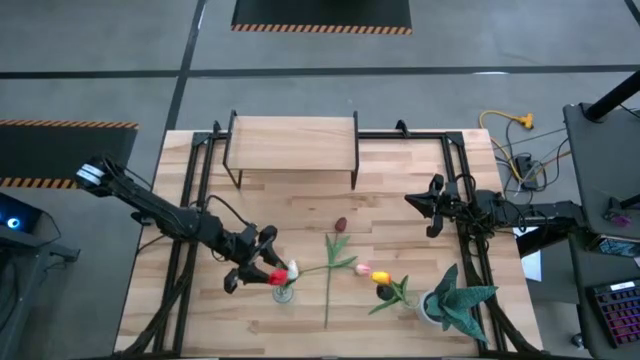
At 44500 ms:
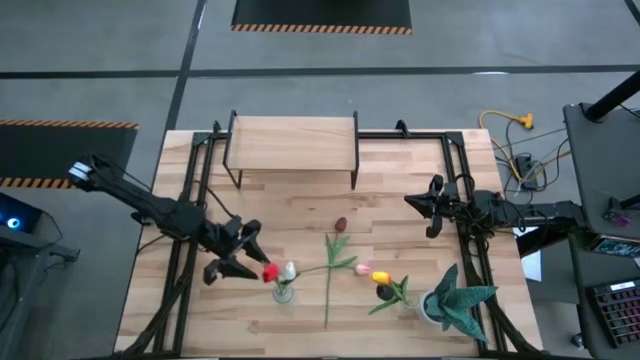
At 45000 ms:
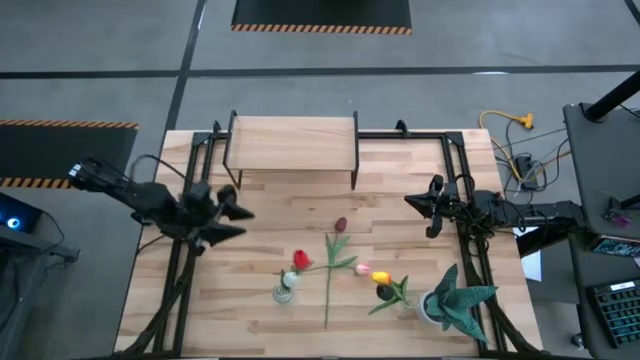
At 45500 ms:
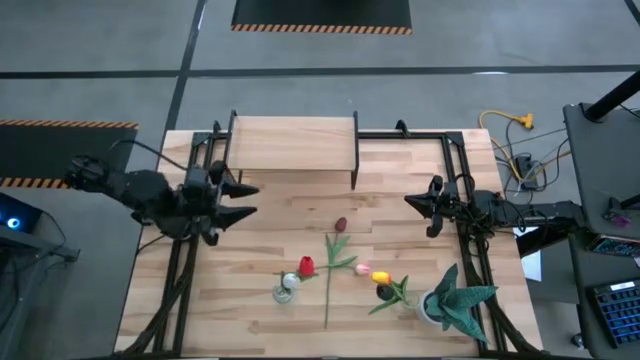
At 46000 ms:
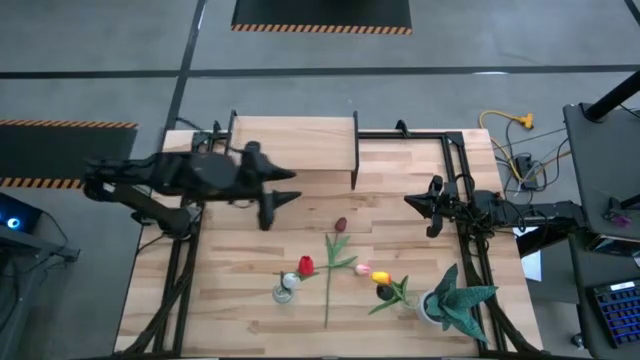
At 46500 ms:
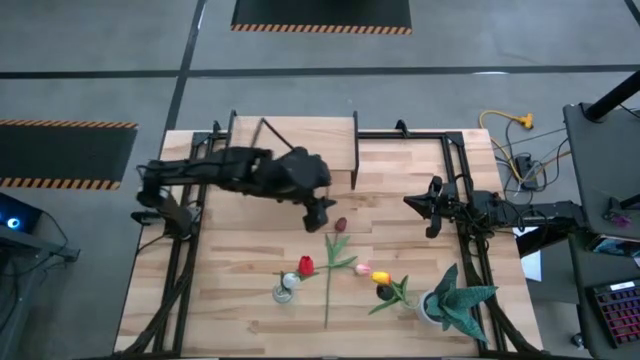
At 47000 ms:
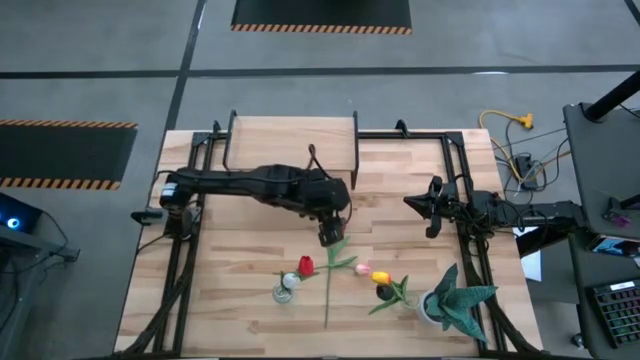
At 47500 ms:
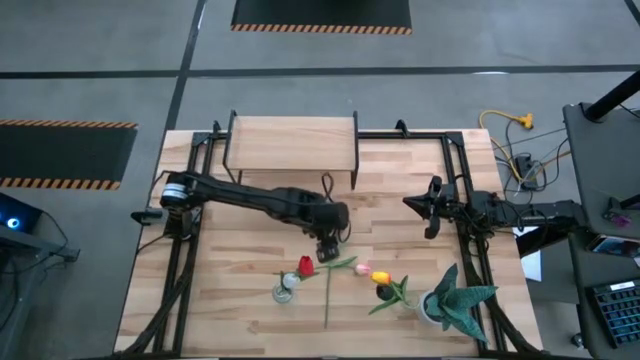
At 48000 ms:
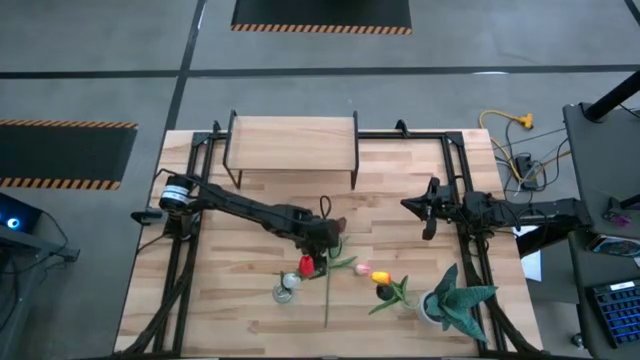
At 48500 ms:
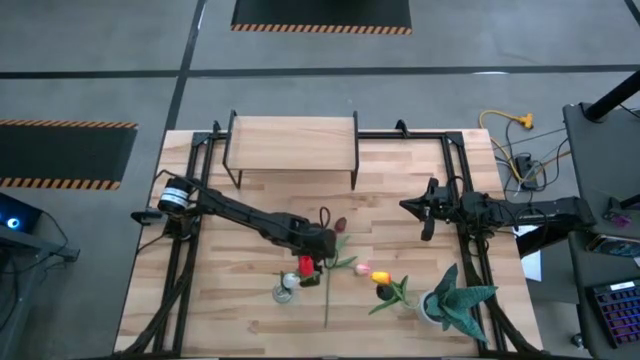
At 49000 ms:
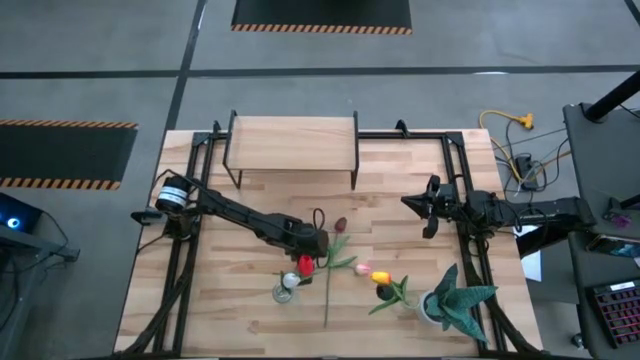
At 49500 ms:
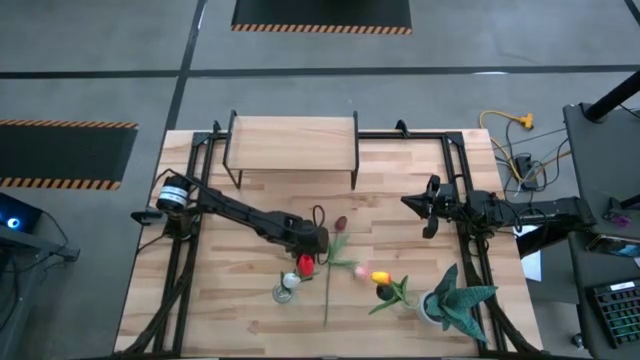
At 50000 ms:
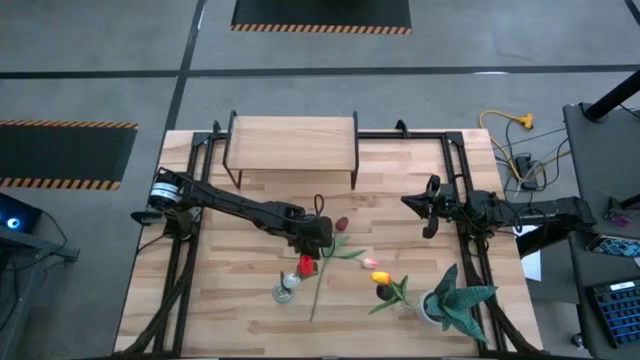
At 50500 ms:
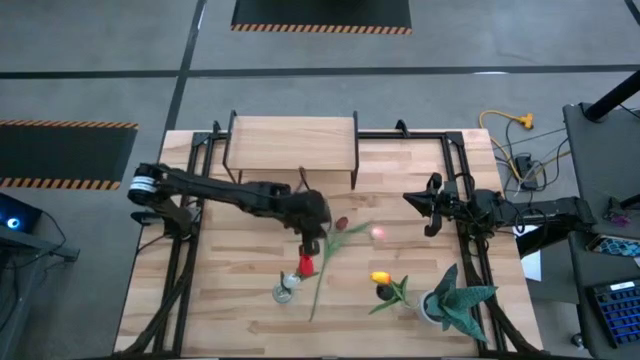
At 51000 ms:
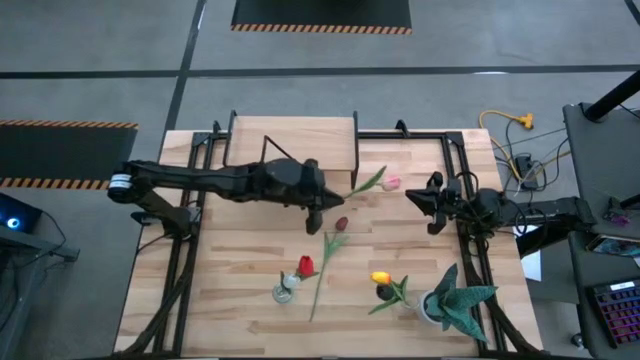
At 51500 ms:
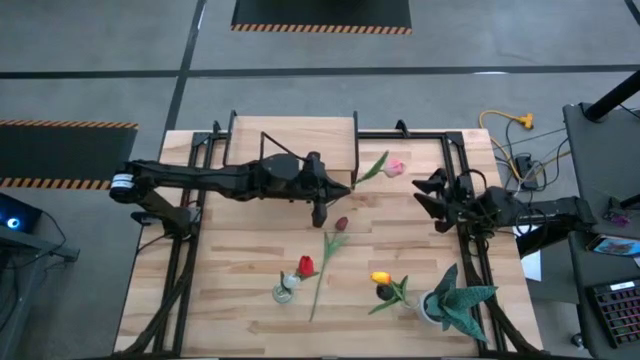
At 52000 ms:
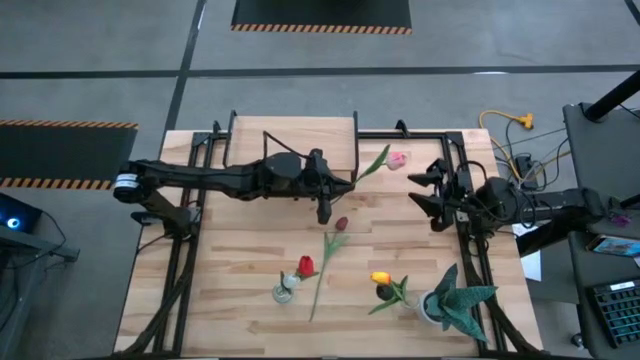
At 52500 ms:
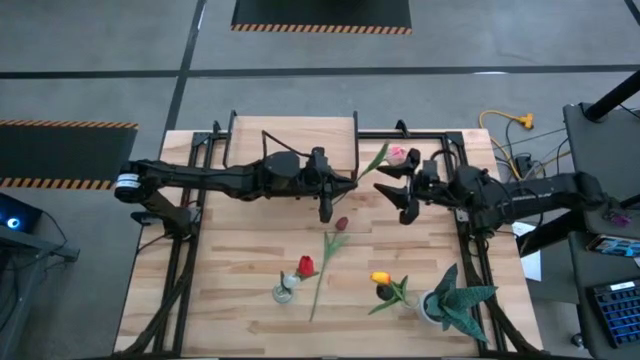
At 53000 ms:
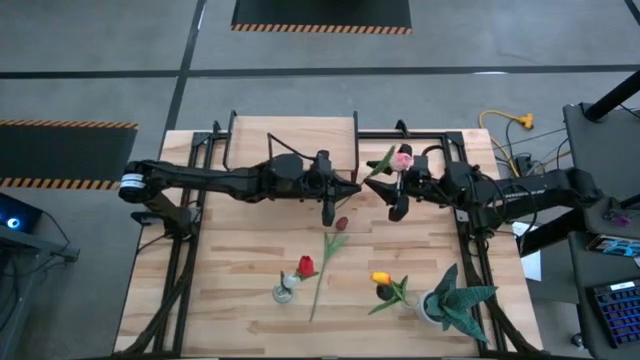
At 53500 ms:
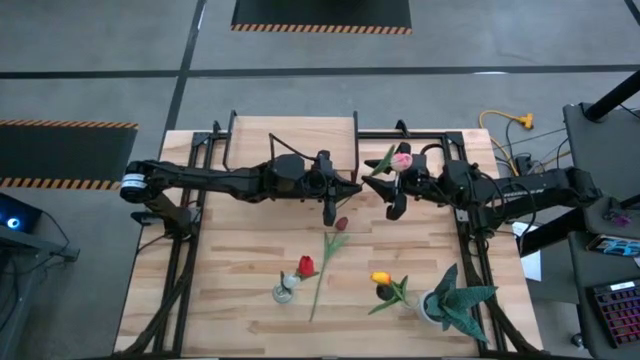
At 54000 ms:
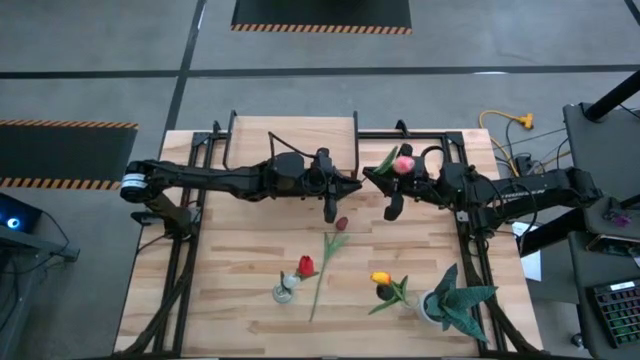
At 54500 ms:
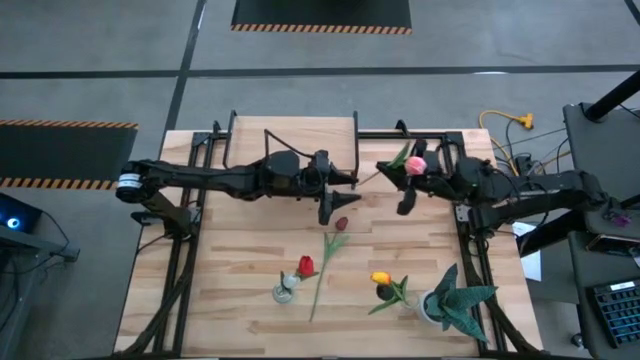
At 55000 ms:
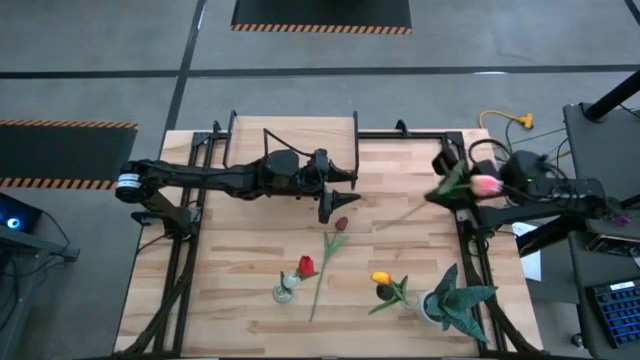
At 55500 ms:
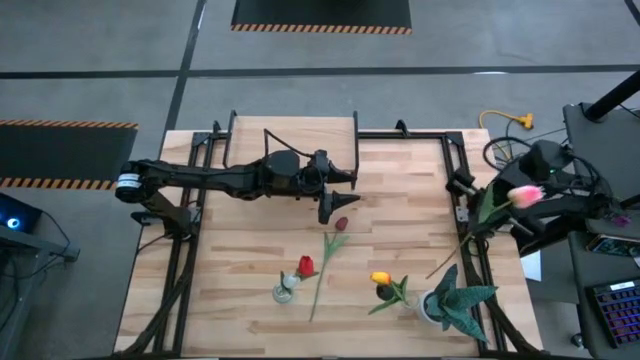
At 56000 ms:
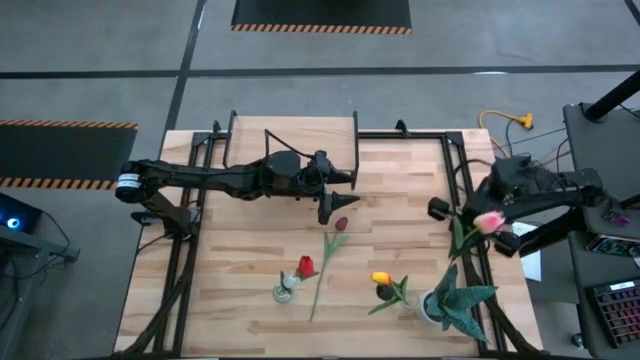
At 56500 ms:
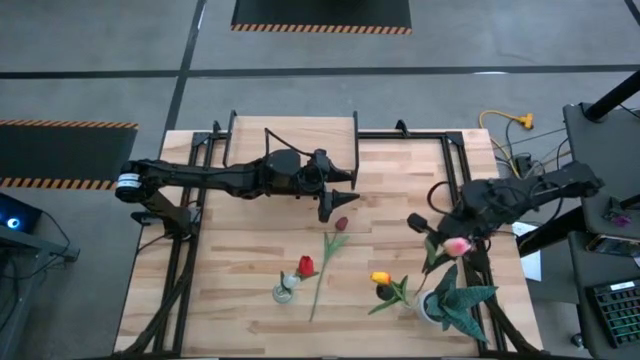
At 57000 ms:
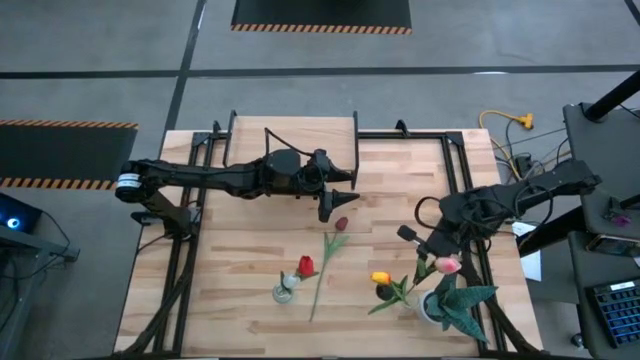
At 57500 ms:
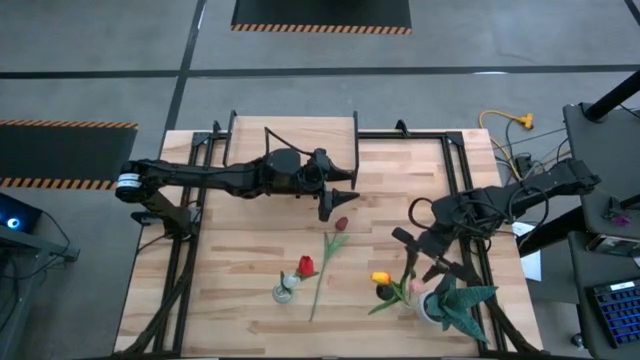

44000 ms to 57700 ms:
Task: Pick and place flowers into a vace then onto a shelf
Put the light red flower into the right transparent vase

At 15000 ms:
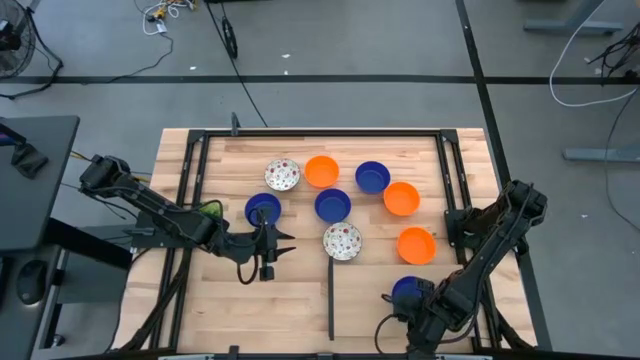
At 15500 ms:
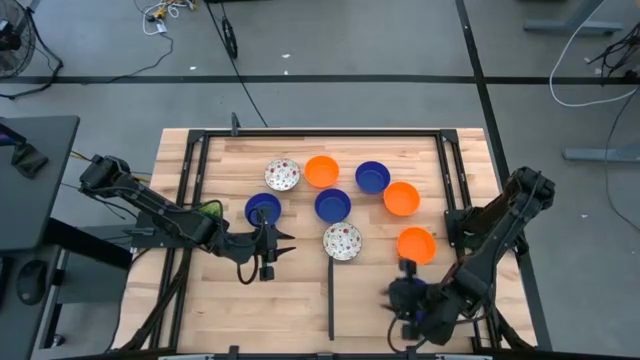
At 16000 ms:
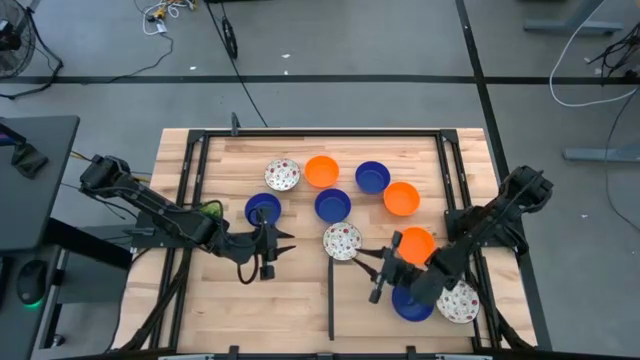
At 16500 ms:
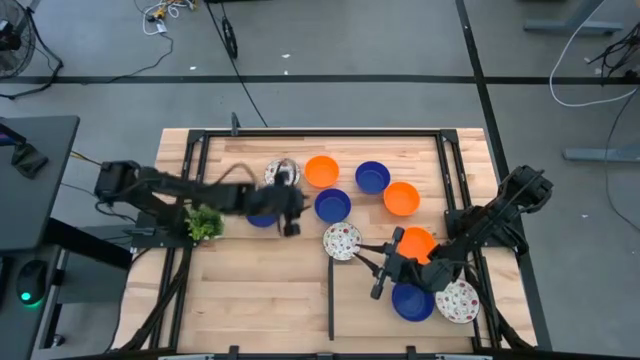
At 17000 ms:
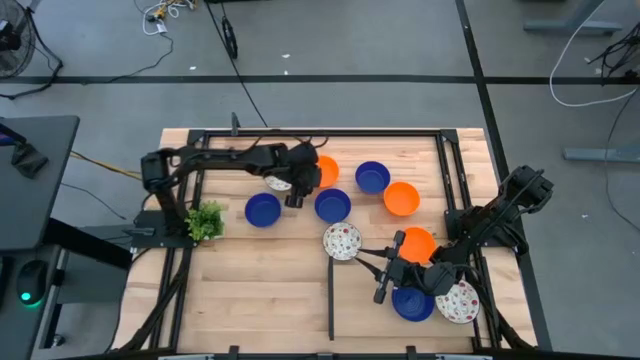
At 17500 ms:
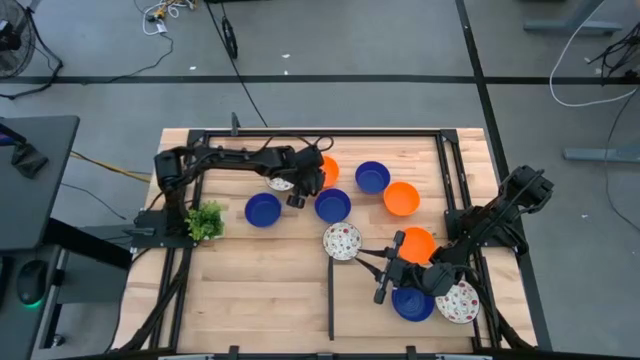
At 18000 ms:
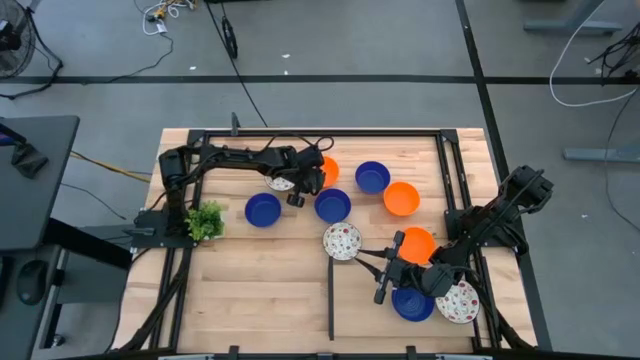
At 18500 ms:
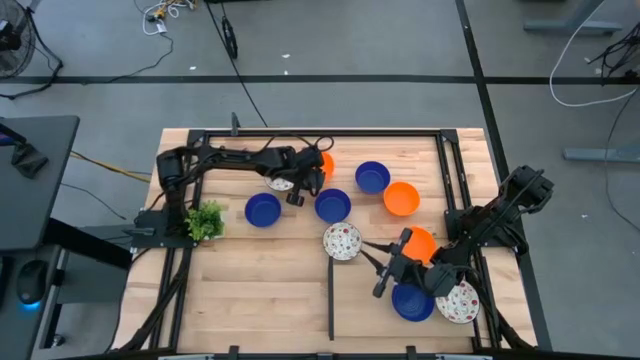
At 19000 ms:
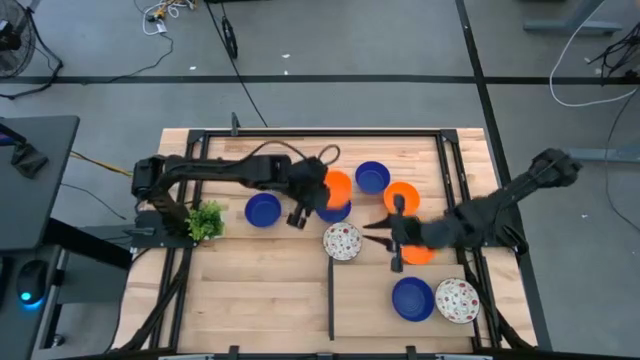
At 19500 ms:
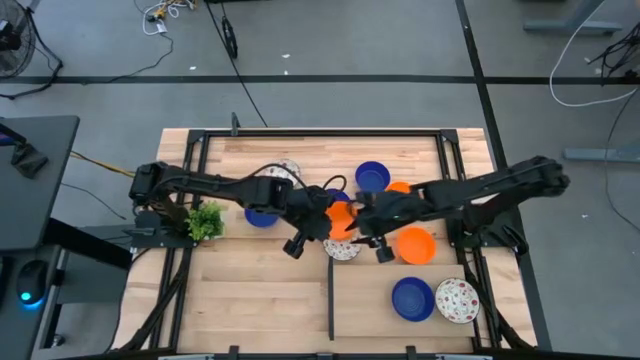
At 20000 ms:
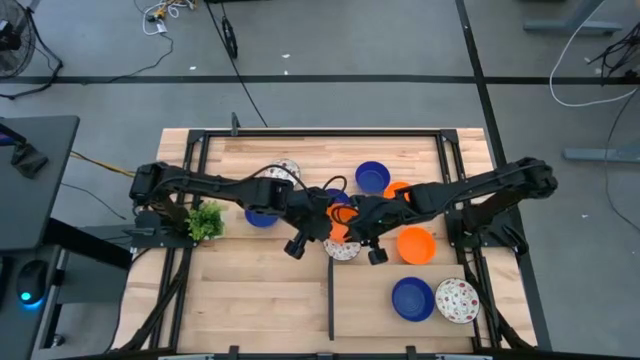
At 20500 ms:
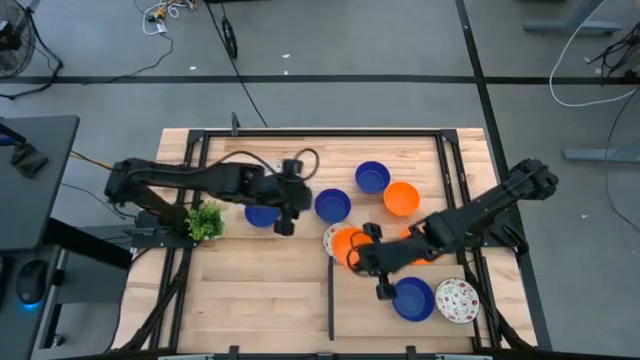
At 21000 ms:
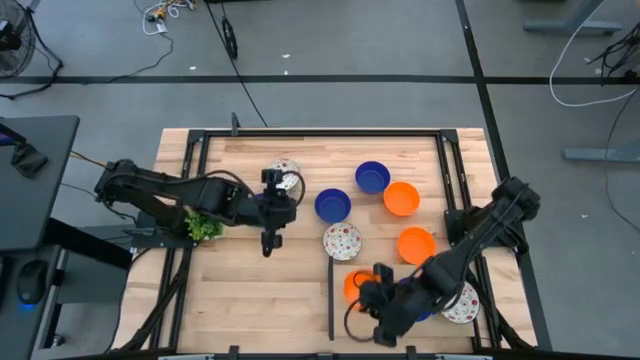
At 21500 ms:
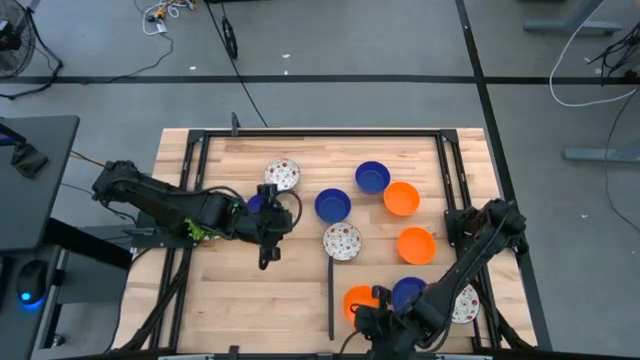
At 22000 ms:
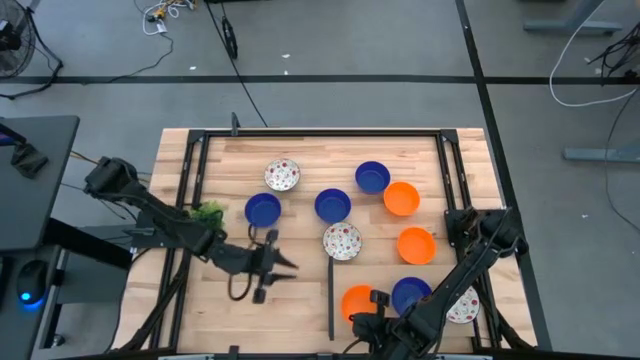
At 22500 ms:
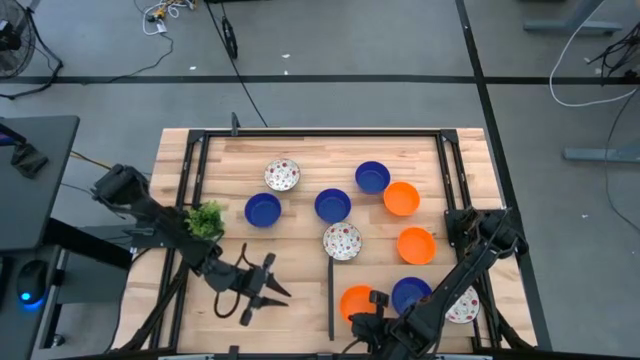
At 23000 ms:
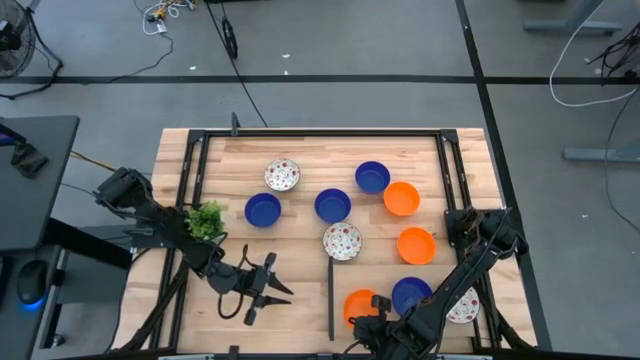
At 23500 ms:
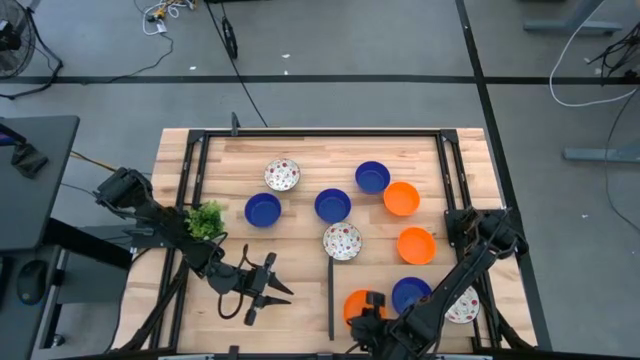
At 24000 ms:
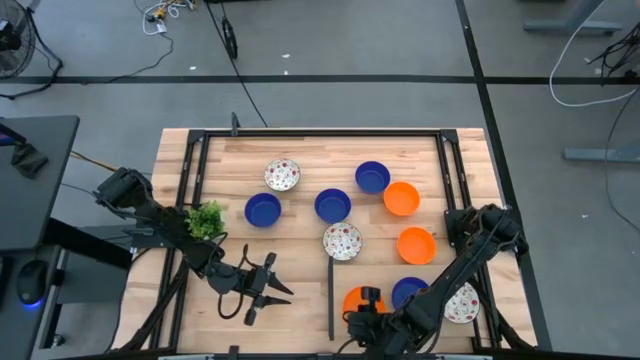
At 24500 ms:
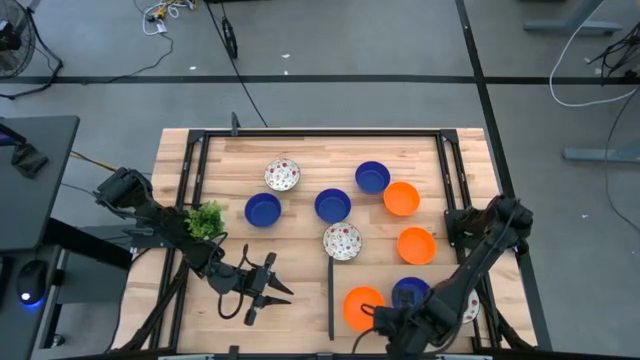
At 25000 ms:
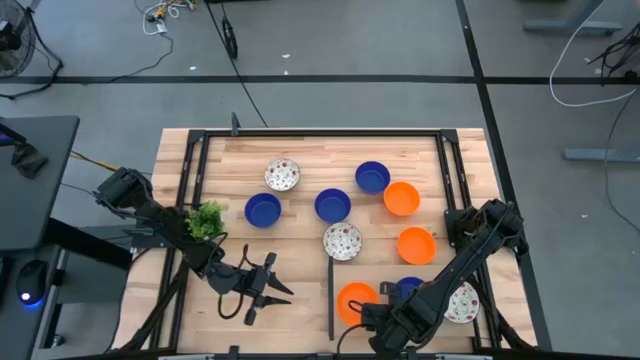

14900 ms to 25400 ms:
Task: Pick & Place Mini bowls
Put the orange bowl on the shelf
